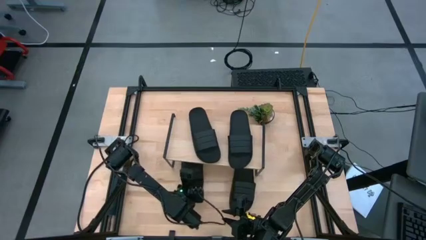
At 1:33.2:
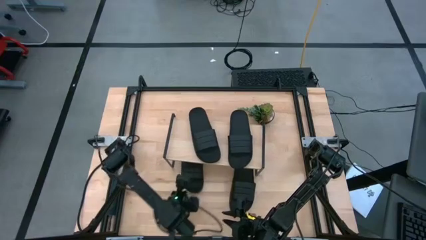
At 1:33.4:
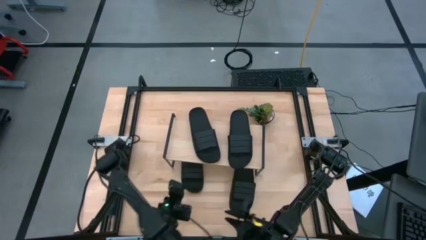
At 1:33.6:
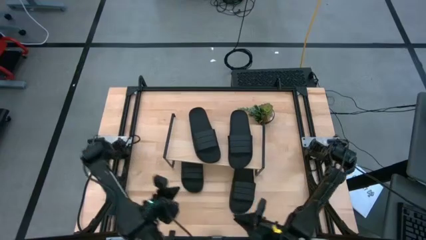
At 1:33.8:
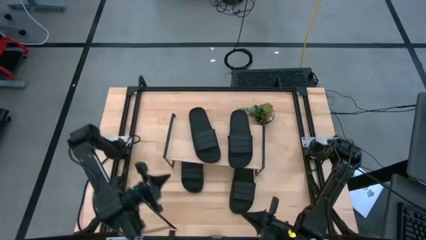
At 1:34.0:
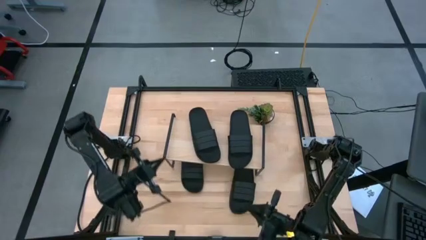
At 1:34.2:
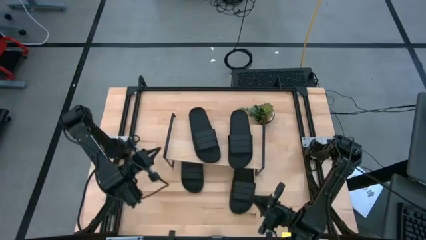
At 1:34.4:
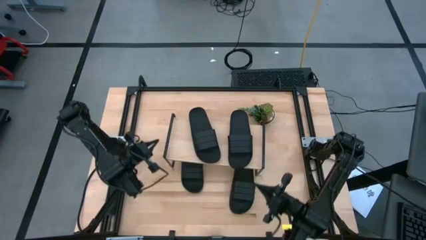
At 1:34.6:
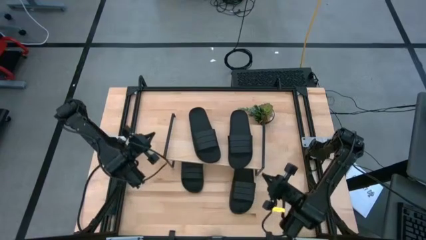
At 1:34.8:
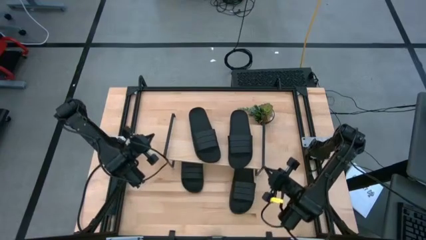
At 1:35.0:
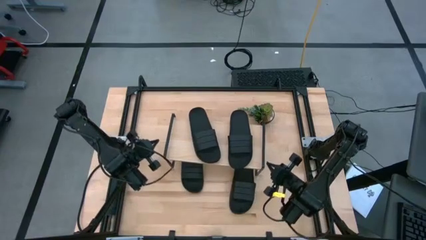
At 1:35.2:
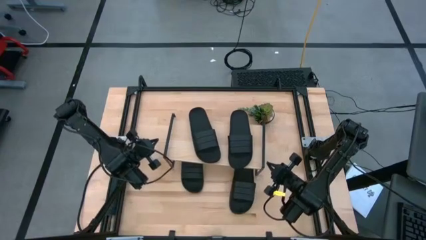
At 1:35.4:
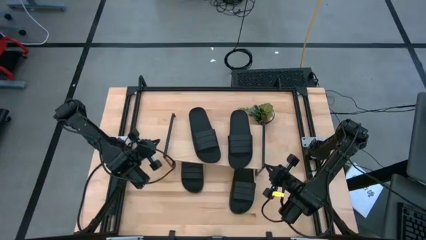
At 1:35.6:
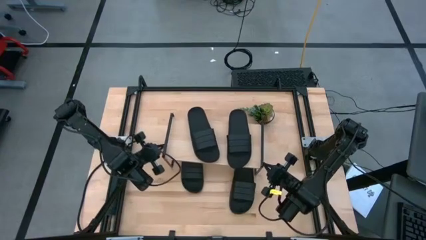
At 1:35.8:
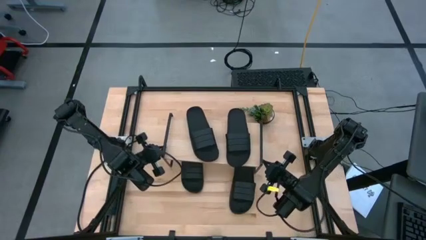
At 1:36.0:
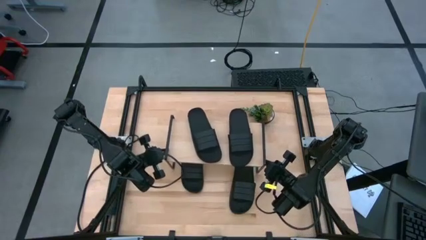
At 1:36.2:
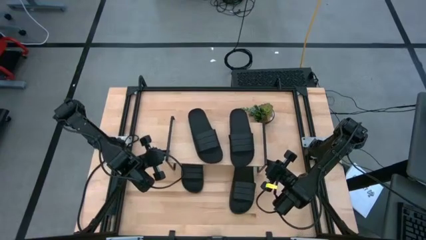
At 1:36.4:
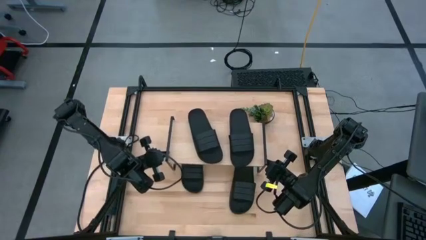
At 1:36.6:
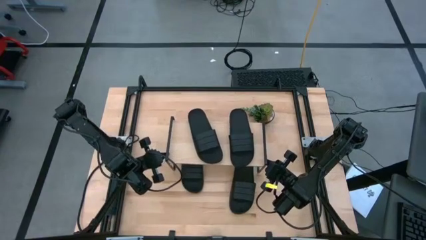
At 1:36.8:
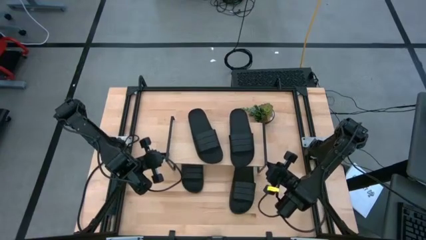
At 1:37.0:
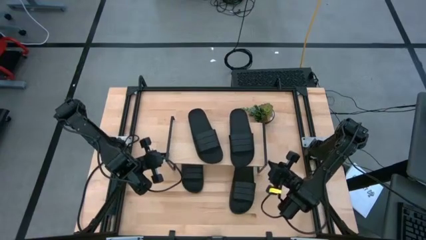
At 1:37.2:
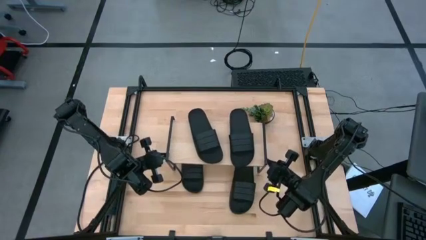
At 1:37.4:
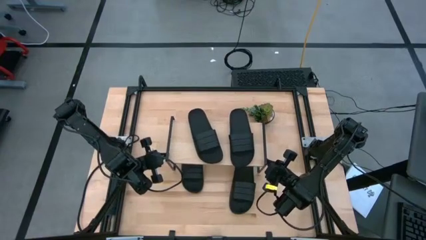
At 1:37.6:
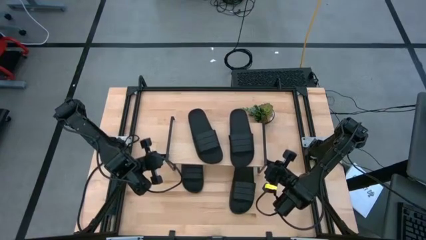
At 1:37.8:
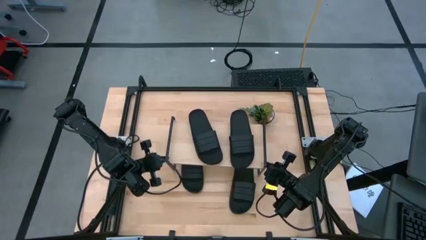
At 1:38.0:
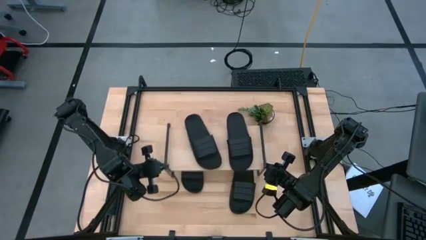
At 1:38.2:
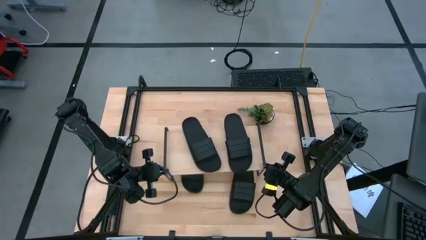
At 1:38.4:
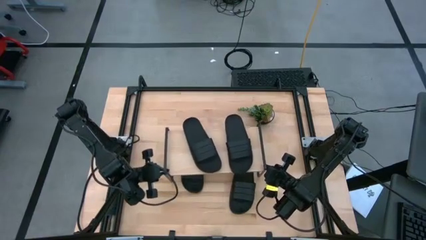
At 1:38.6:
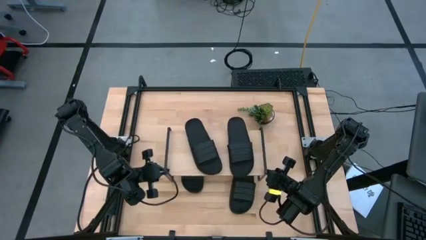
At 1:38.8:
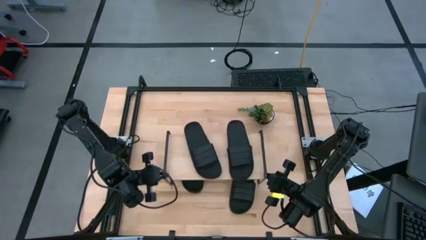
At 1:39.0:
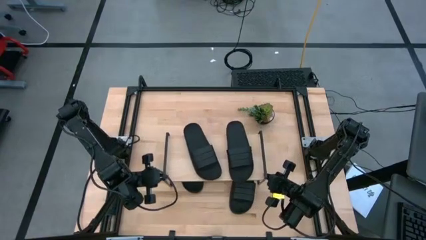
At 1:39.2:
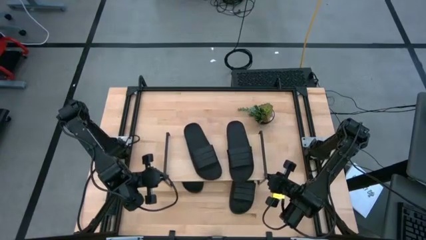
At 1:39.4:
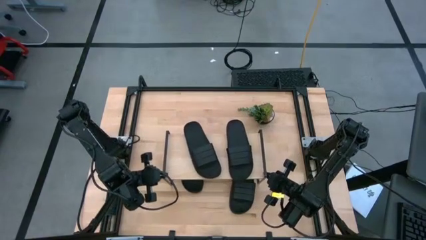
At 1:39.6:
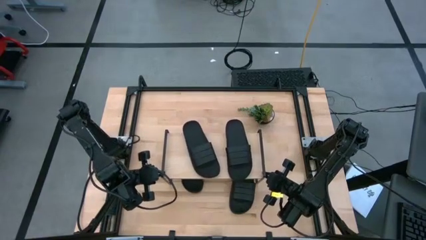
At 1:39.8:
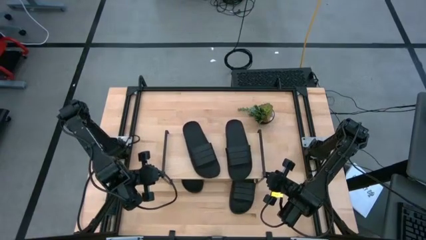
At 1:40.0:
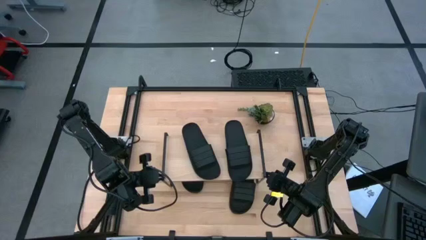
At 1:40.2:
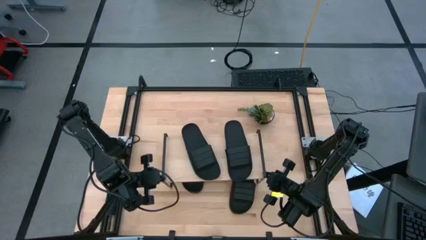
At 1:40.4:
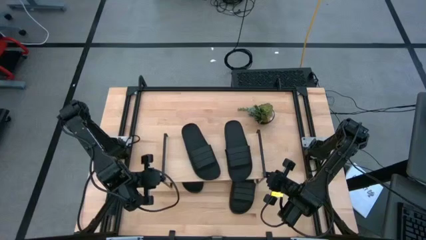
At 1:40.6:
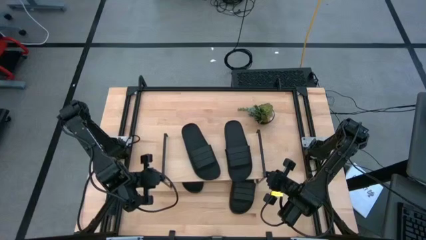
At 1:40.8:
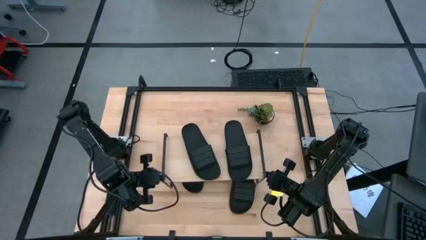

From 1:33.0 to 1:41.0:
Task: Pick and place slides into the shelf
Adjust the shelf

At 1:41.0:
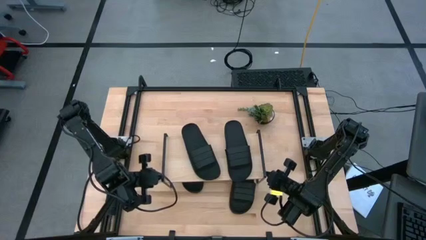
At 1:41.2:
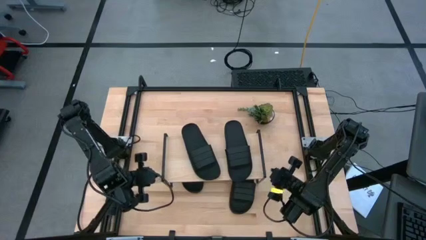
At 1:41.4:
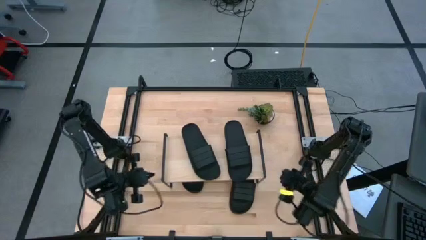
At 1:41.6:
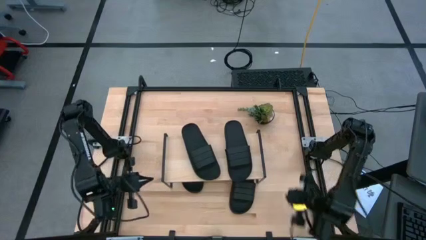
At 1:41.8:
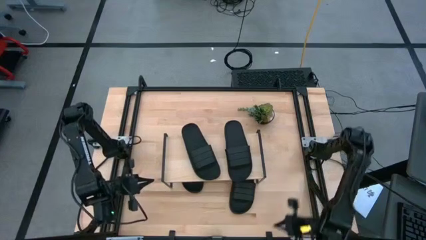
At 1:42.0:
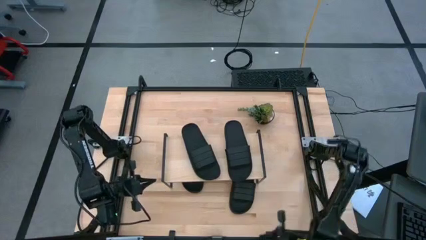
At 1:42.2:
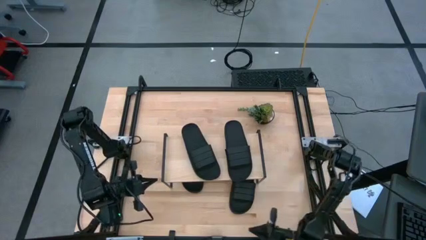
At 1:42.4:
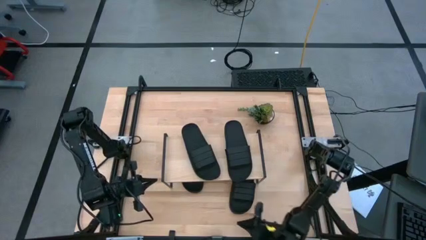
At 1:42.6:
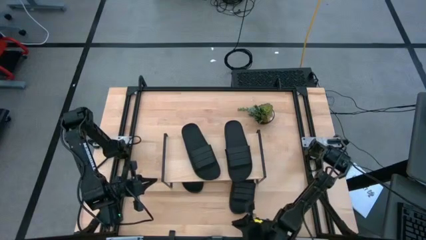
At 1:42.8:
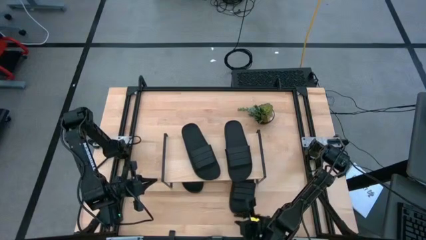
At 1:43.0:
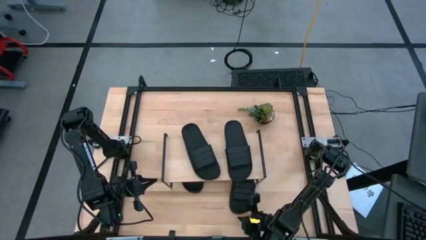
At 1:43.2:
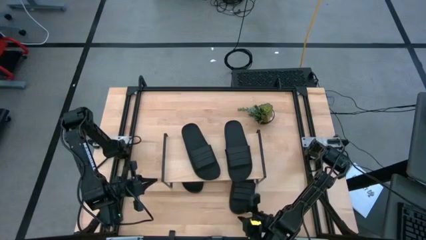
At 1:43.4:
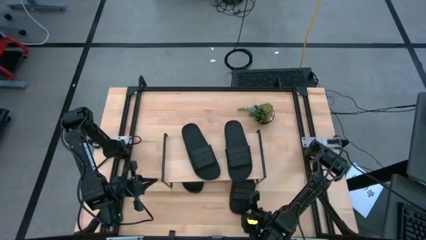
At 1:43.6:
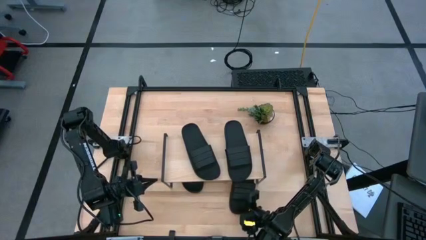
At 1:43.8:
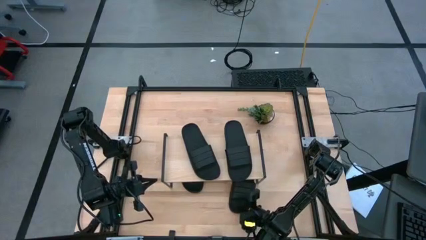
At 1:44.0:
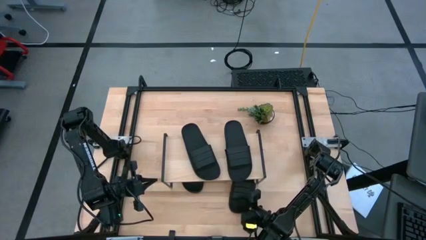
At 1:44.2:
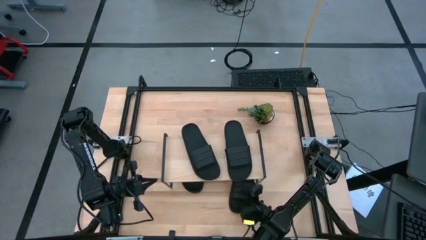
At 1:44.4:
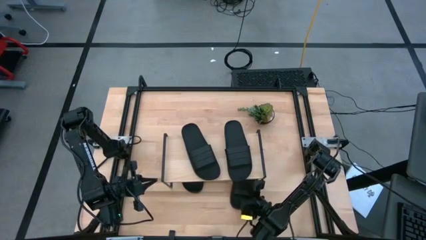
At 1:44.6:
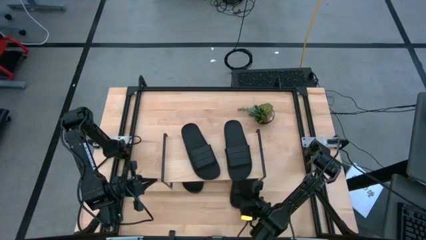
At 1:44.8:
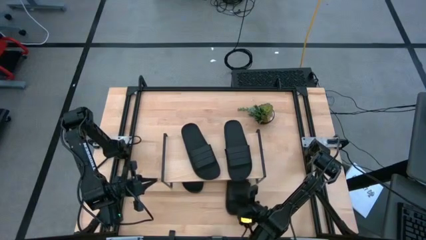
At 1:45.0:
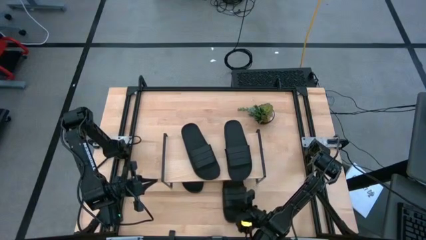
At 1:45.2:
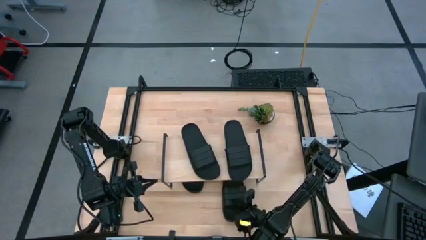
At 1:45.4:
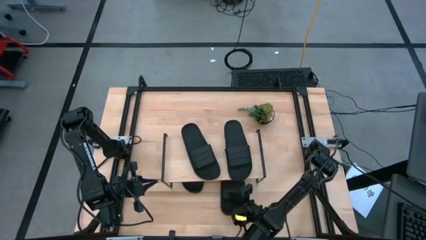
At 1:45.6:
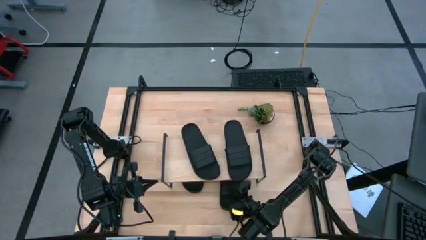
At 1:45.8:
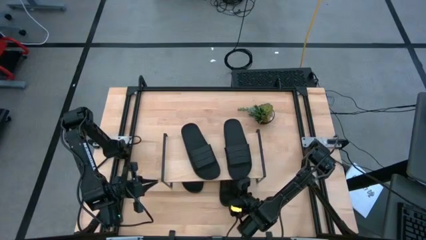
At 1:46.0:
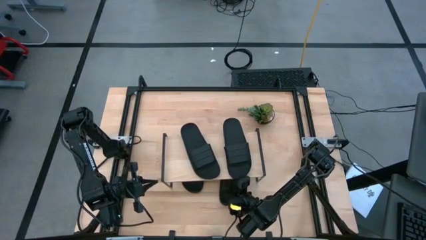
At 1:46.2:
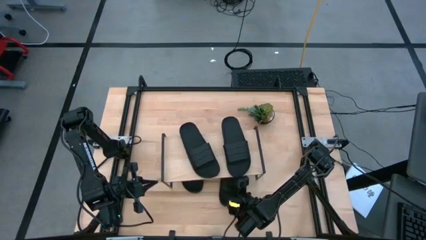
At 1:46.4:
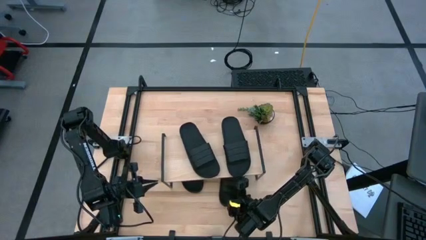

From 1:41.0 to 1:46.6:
Adjust the black slide under the shelf

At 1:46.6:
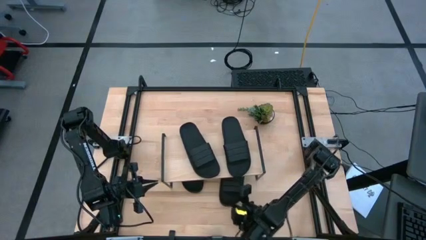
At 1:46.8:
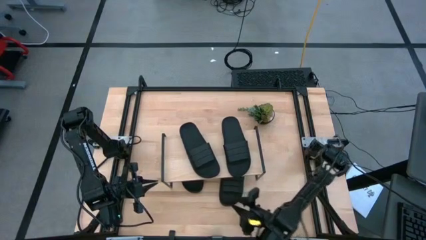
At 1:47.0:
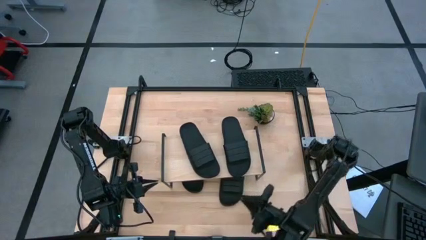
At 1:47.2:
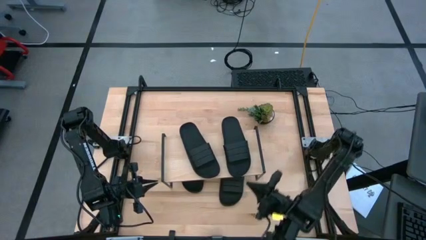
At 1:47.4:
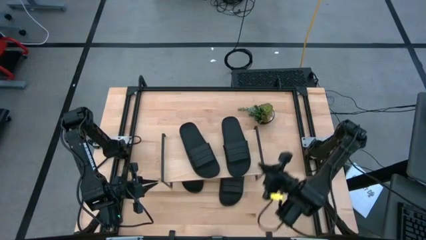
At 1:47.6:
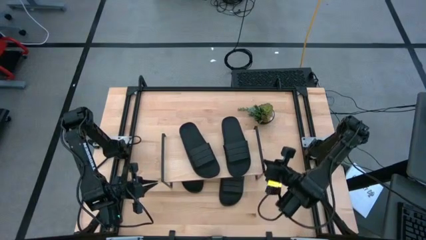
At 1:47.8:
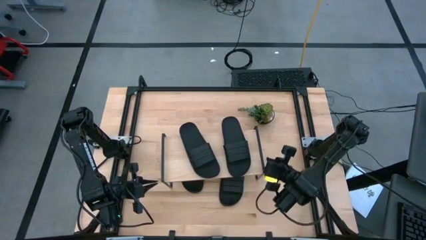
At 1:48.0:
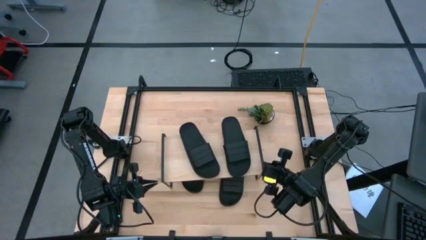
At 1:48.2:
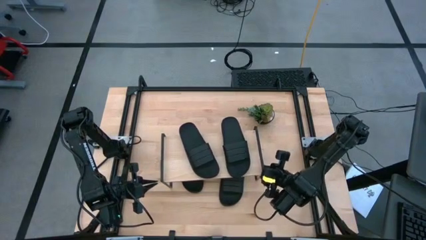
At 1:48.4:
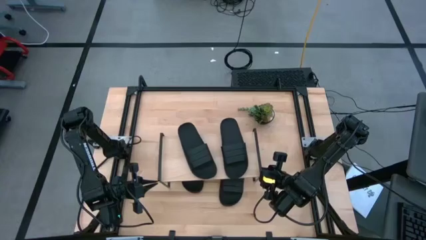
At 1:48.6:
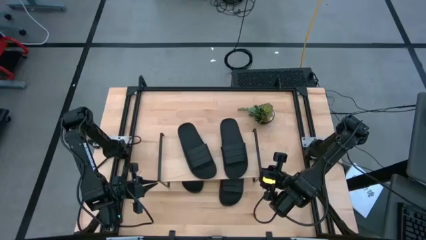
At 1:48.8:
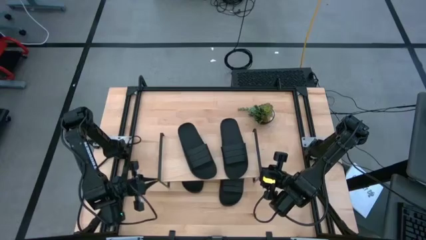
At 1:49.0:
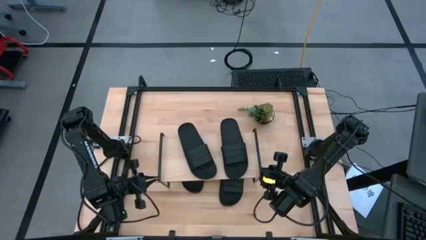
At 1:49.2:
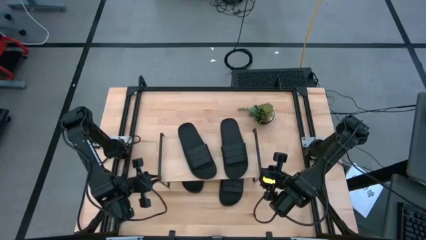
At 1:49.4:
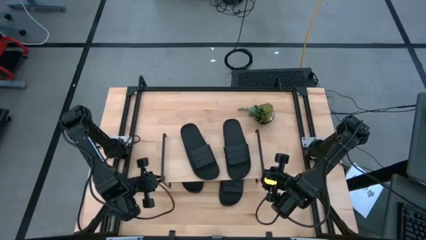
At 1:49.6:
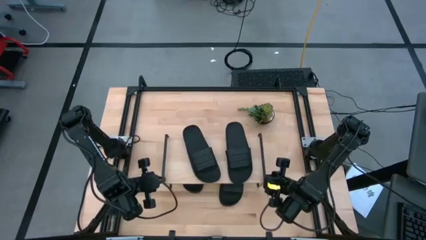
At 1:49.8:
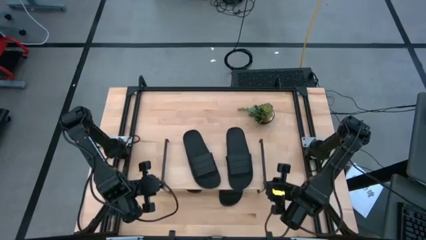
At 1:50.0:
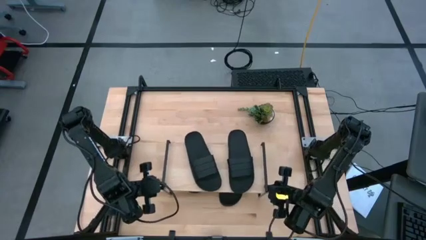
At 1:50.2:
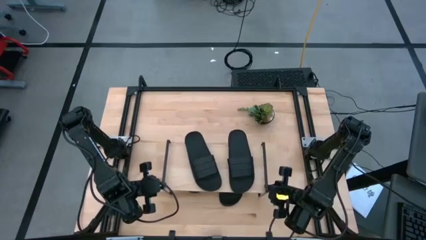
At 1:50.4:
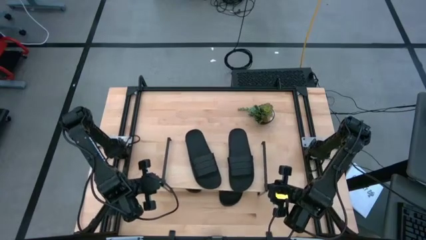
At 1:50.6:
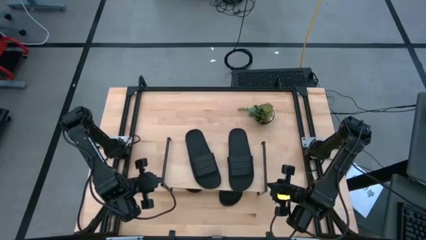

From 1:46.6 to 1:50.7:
Adjust the shelf
